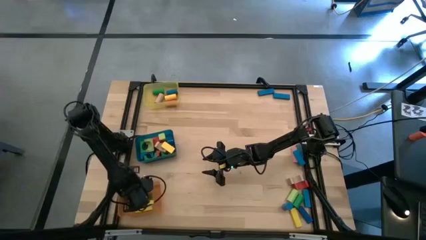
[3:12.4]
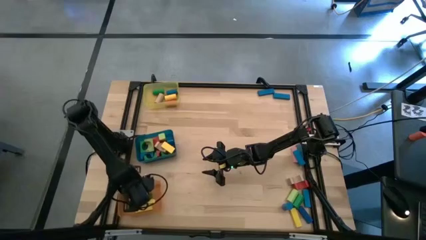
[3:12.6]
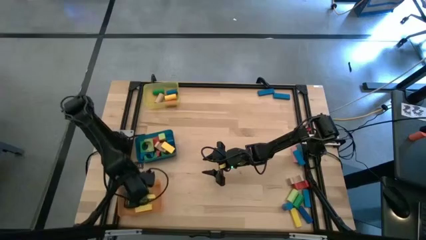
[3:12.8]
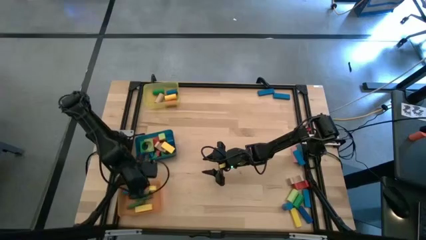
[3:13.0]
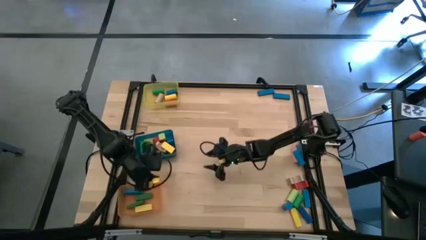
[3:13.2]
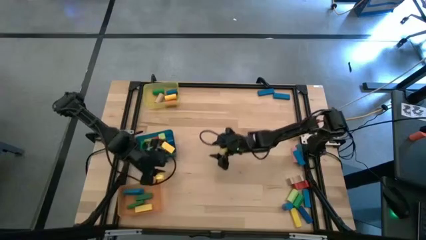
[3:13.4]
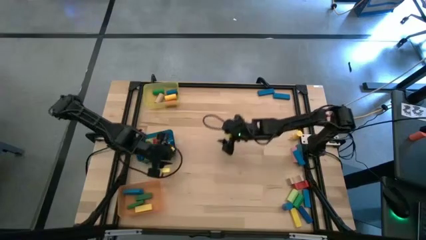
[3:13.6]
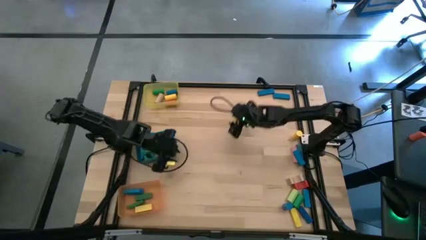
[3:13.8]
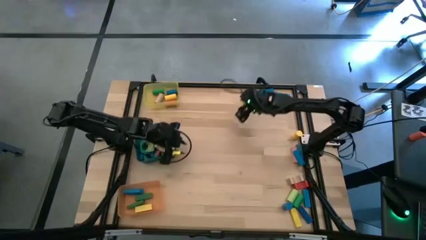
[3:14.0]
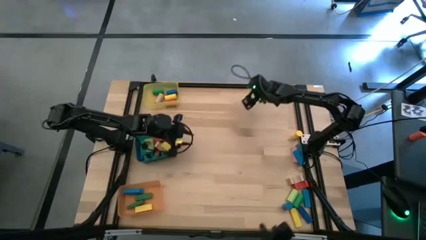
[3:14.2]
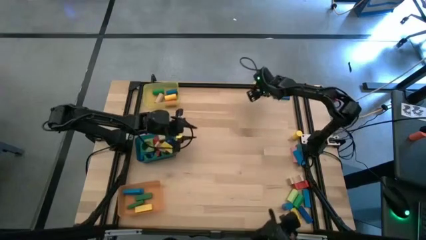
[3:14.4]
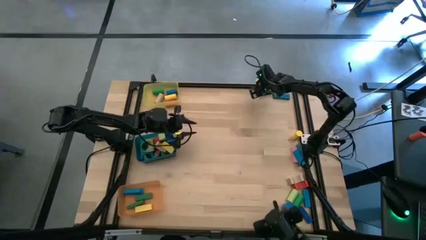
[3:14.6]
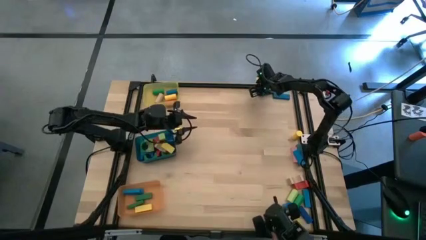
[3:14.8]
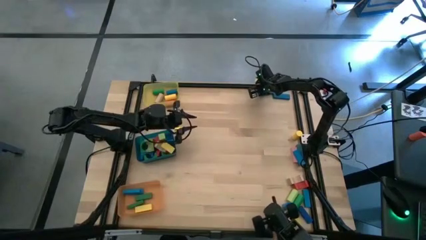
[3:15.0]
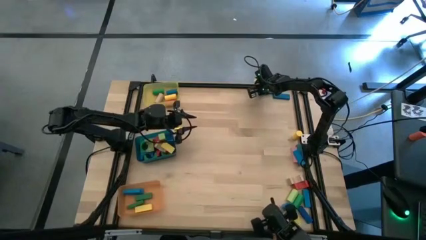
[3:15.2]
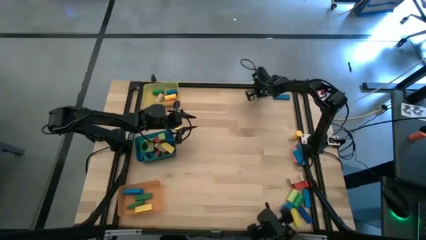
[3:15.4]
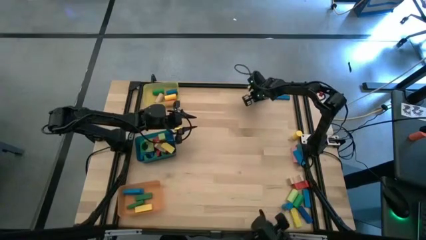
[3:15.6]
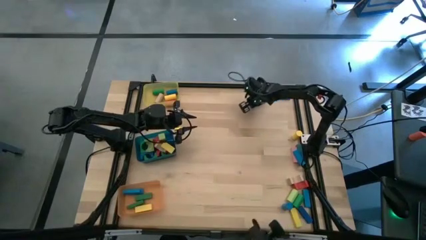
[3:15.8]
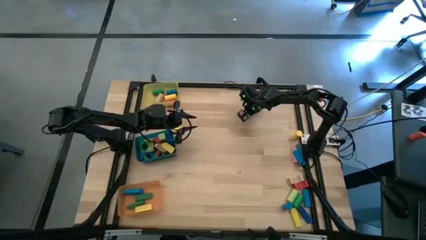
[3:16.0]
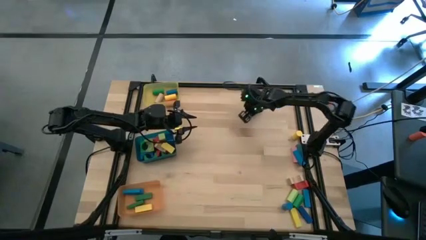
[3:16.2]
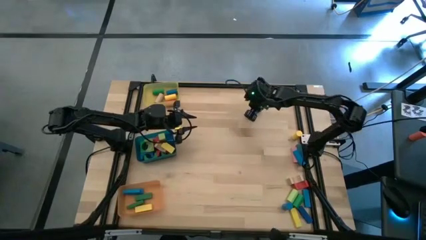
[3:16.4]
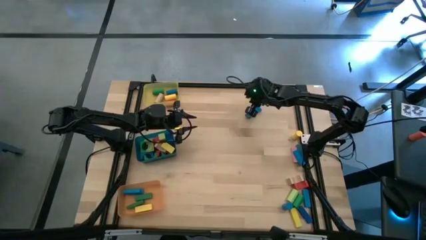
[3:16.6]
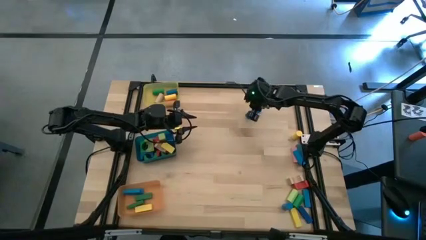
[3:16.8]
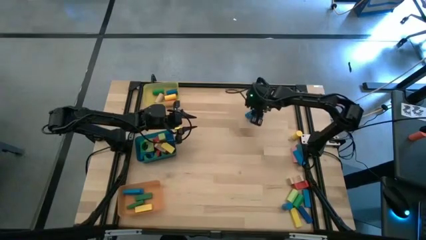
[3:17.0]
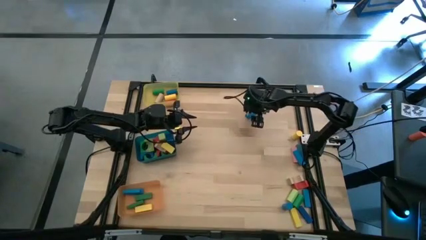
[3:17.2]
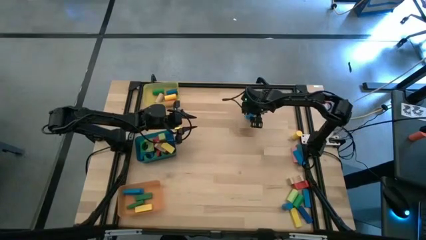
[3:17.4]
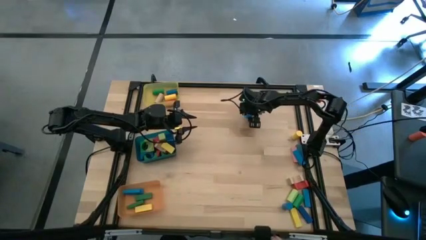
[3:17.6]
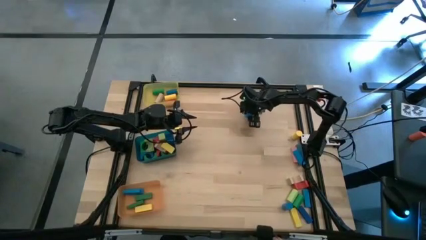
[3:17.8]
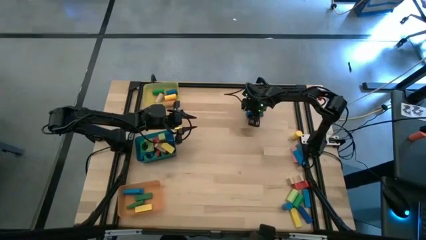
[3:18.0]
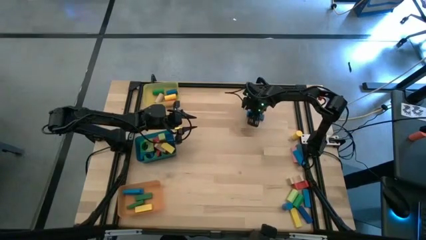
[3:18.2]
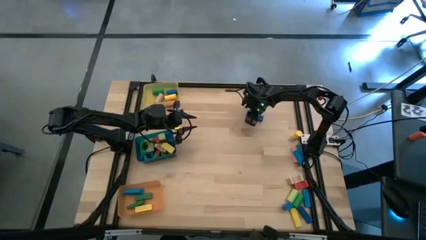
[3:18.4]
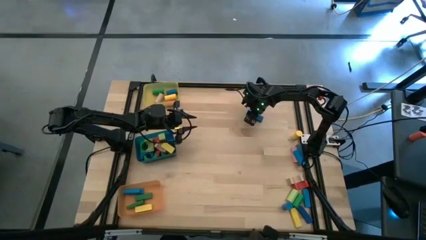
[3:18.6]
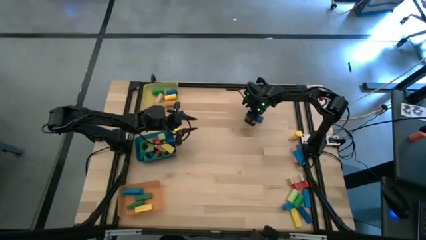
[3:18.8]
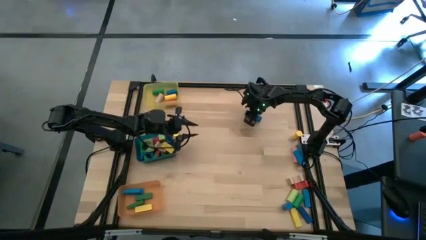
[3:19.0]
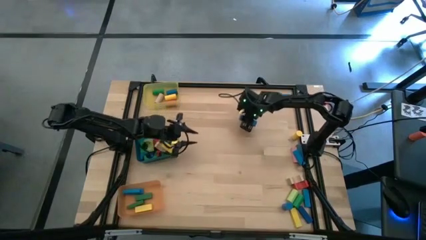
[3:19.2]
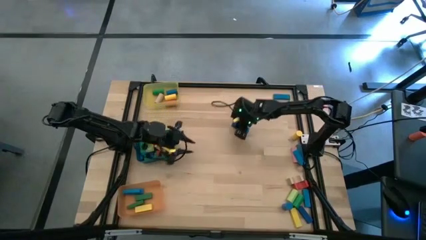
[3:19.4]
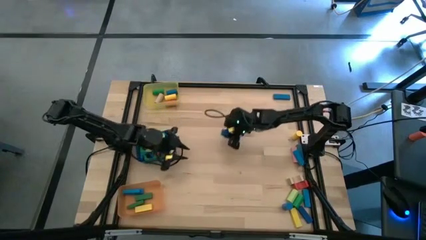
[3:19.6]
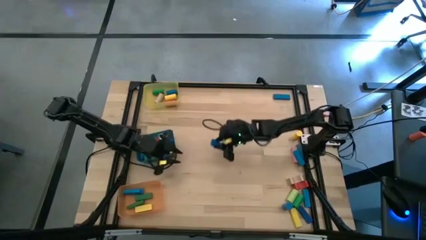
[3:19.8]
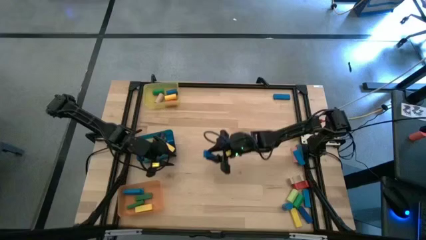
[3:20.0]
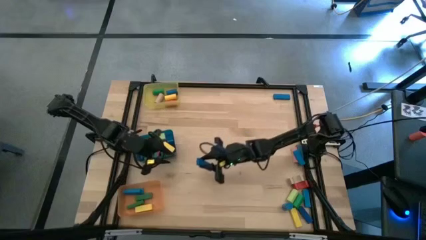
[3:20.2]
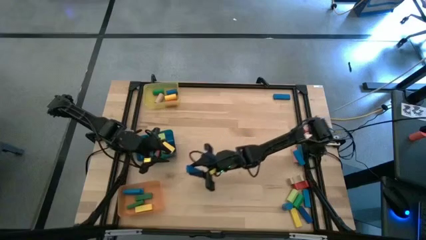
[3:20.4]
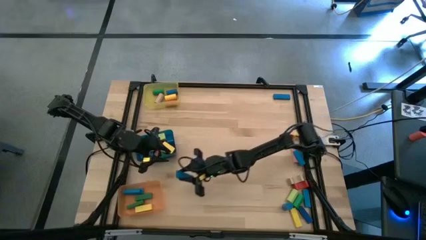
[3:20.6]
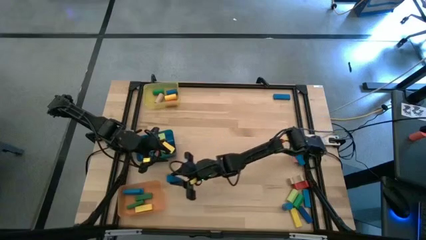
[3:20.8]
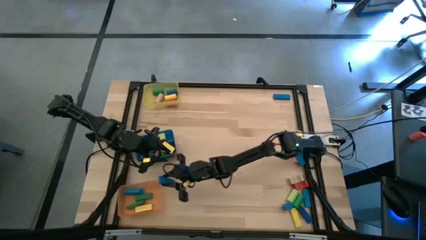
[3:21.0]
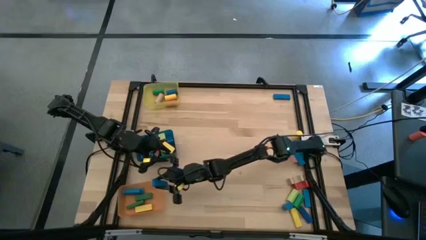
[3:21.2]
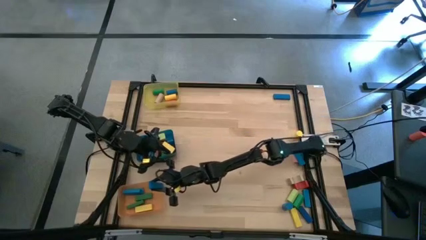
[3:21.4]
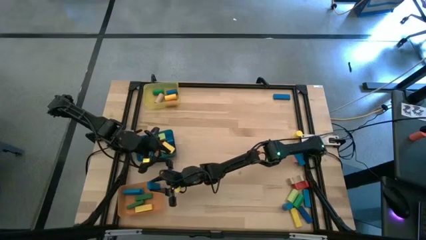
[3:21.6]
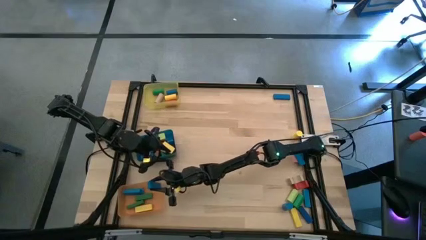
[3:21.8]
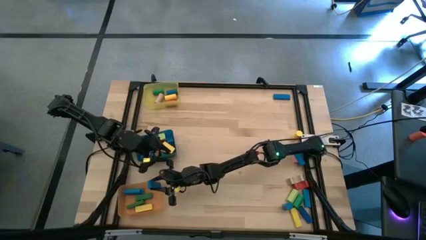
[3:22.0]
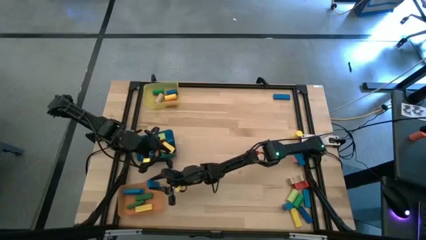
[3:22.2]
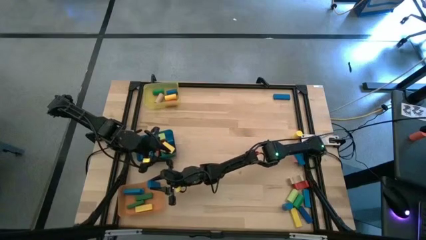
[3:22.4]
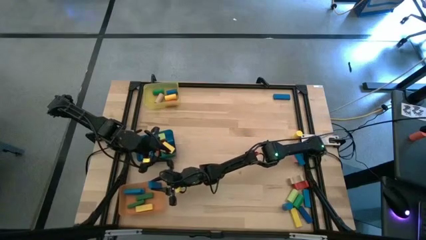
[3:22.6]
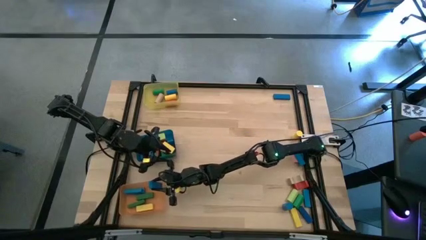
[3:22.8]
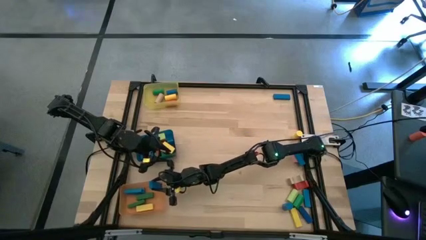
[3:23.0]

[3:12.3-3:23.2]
Task: Sort blocks by size
Put the blue block into the orange bin

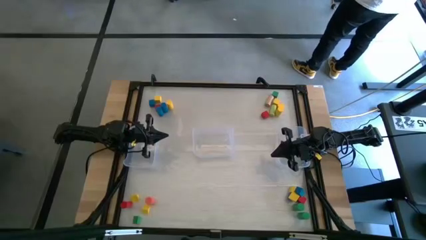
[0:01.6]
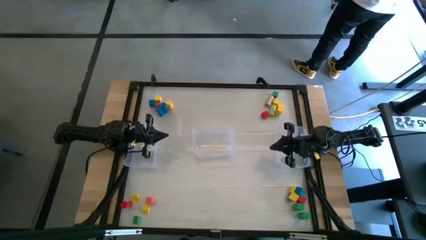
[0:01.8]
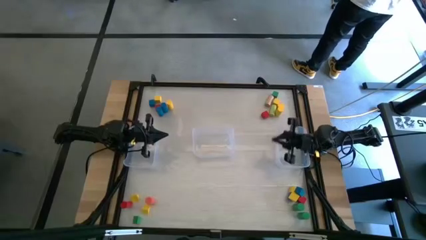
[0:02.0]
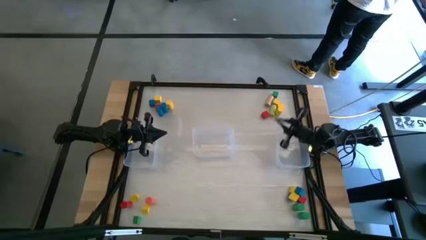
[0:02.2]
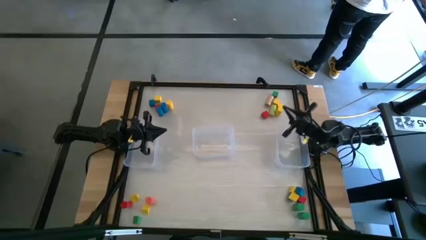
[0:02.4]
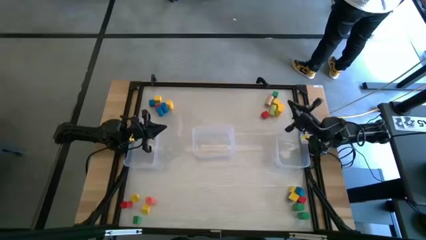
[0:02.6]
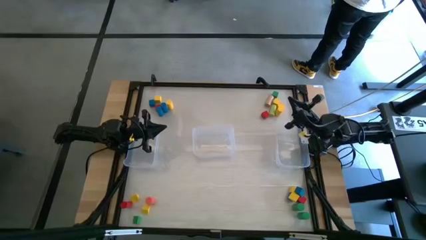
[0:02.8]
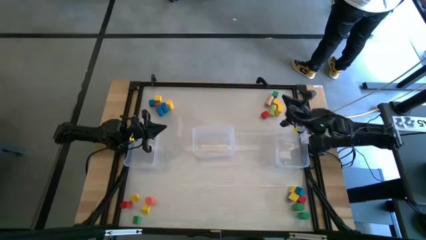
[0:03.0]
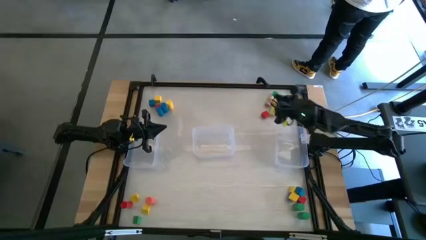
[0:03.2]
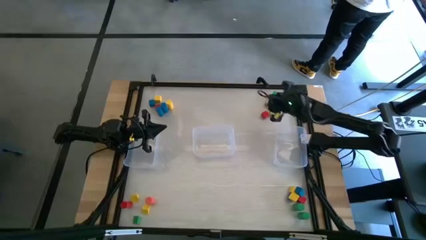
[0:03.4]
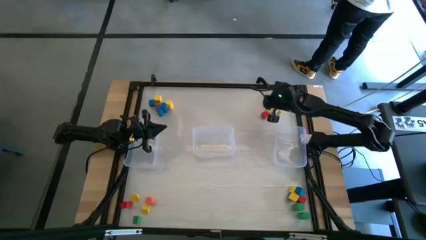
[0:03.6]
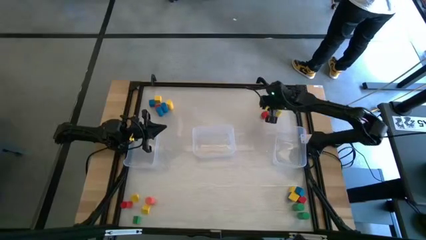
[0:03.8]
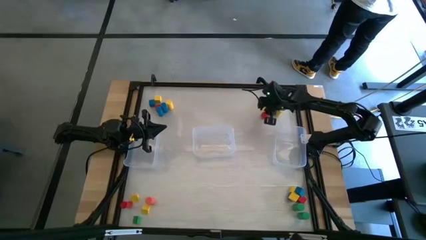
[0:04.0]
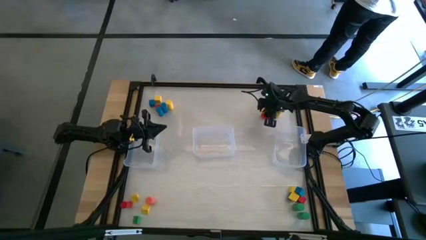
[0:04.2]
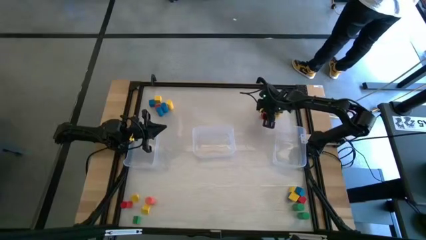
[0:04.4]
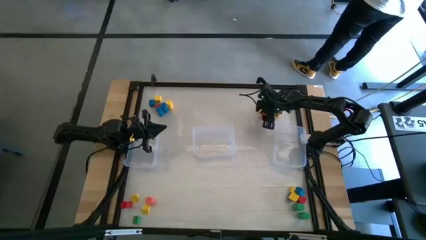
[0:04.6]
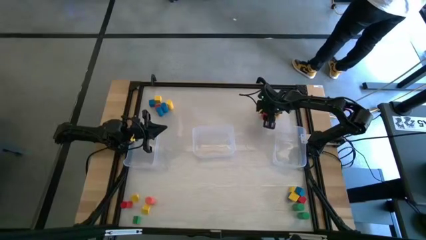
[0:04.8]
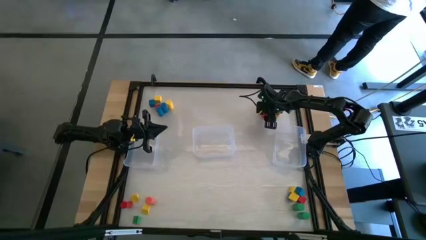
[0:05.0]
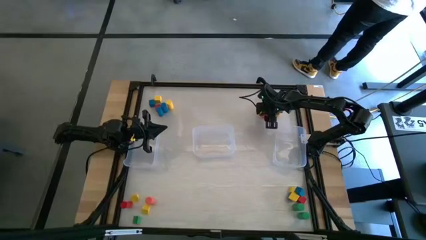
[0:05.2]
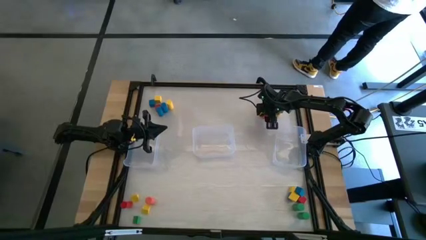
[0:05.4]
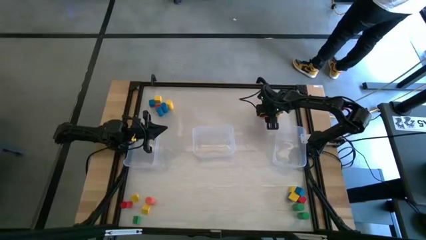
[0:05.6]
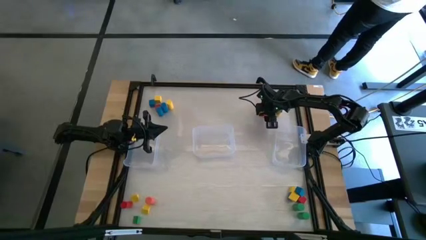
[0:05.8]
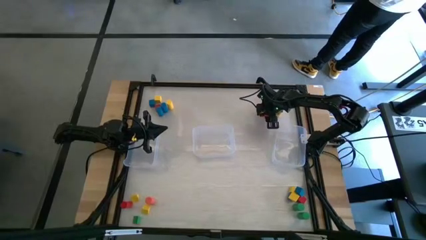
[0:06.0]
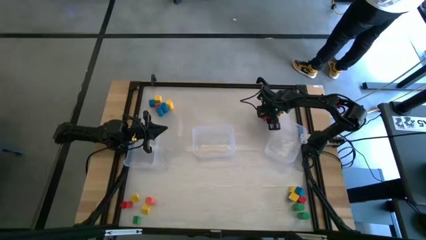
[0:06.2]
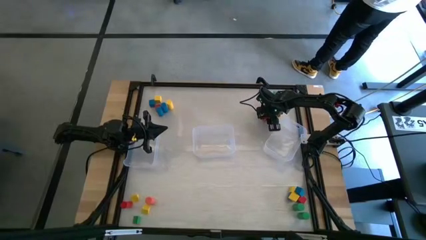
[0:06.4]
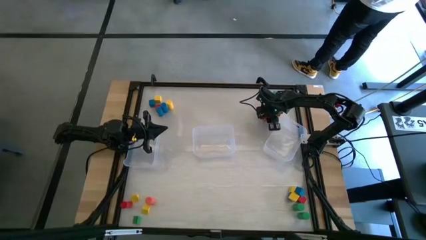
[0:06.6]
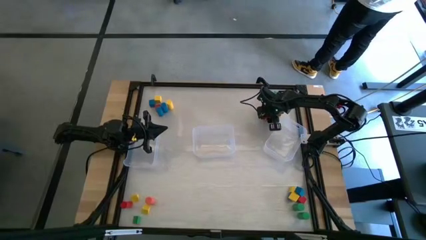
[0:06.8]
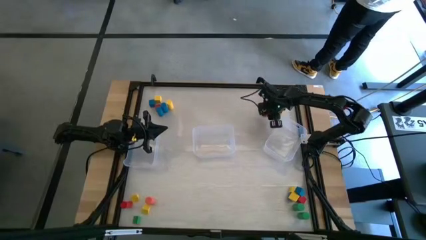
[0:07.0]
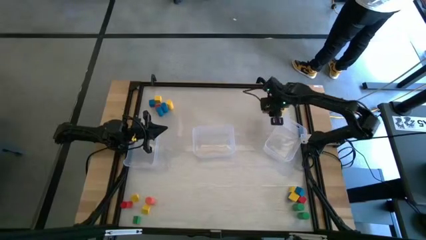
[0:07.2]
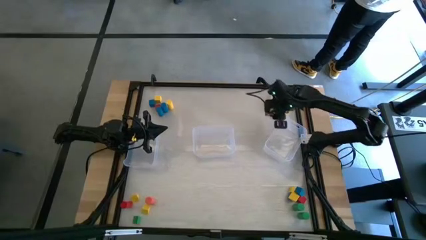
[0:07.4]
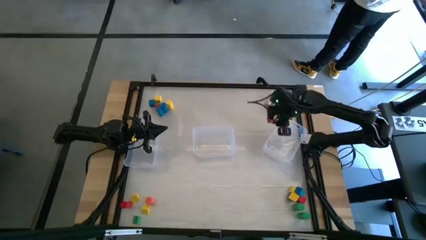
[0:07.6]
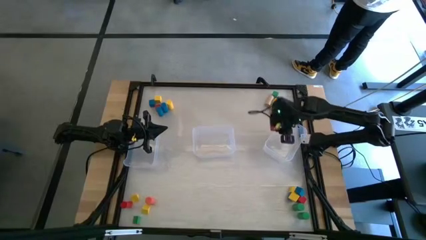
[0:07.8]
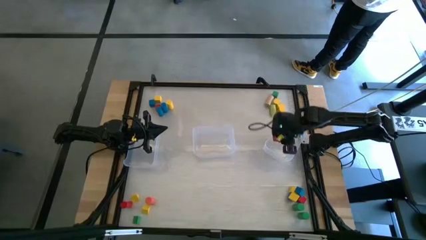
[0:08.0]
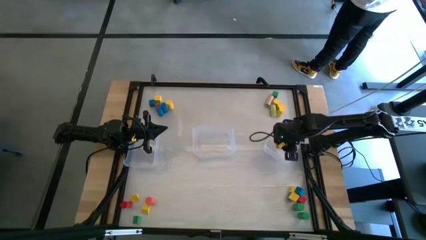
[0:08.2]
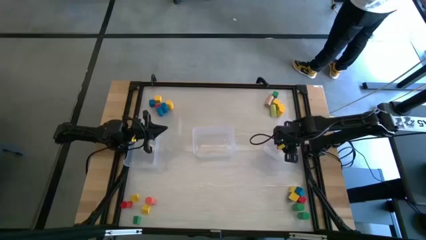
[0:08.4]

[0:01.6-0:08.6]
Task: Sort blocks by size
Put the red cube block into the right transparent bin
